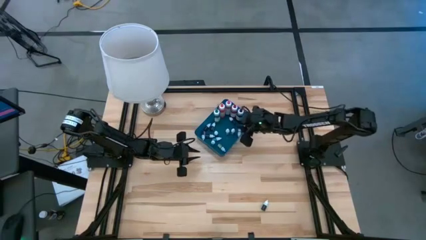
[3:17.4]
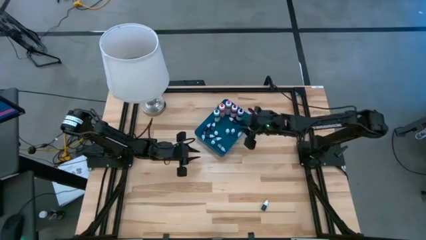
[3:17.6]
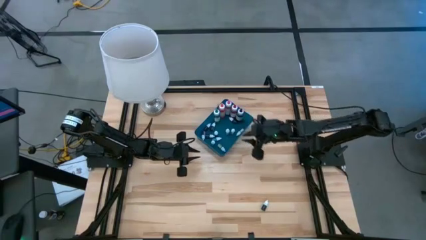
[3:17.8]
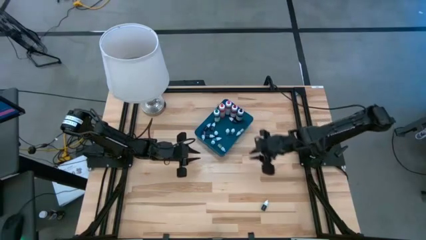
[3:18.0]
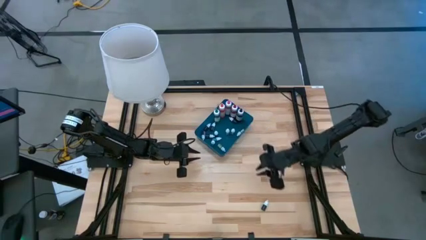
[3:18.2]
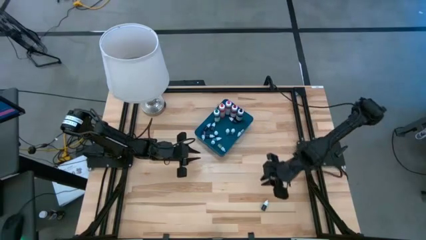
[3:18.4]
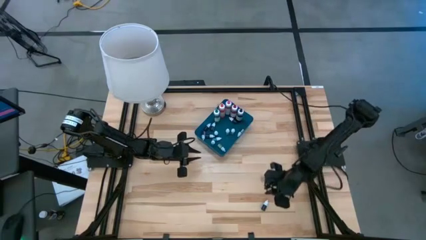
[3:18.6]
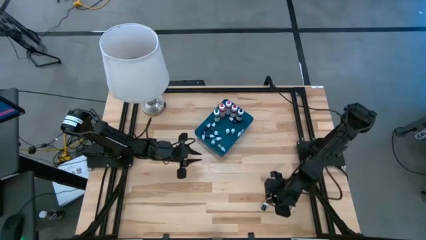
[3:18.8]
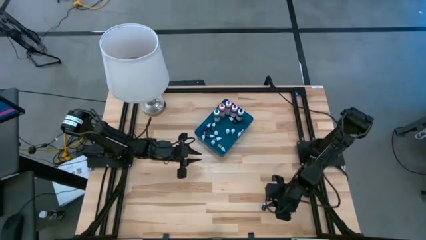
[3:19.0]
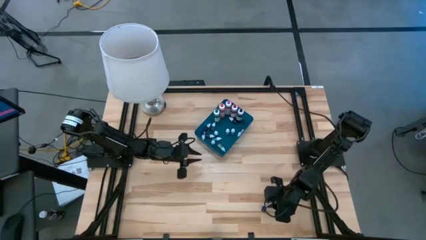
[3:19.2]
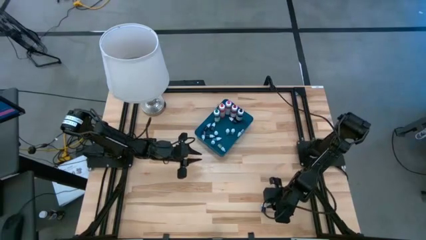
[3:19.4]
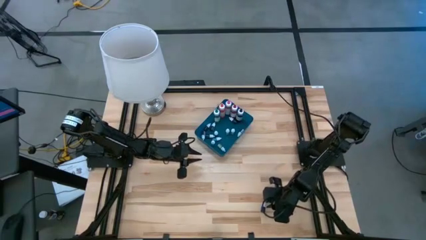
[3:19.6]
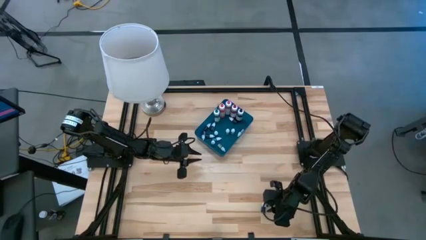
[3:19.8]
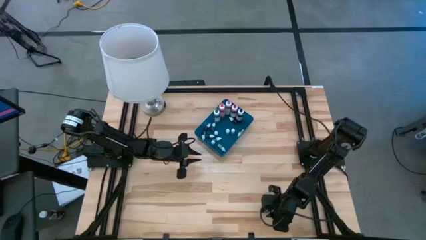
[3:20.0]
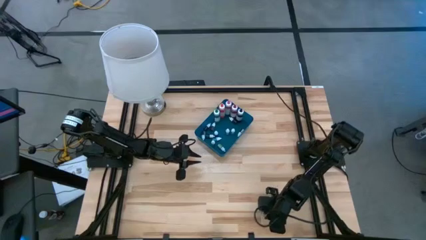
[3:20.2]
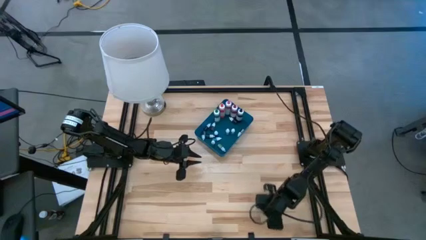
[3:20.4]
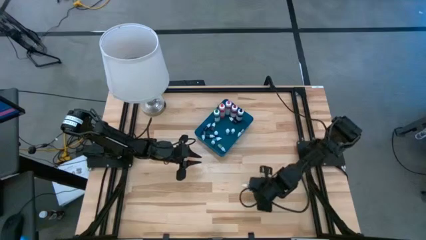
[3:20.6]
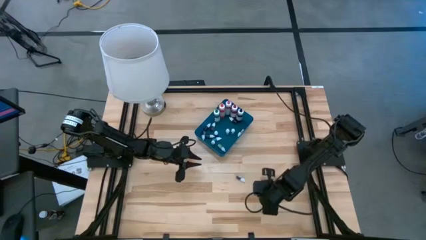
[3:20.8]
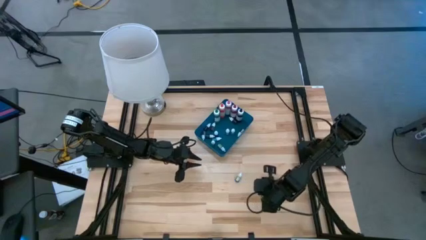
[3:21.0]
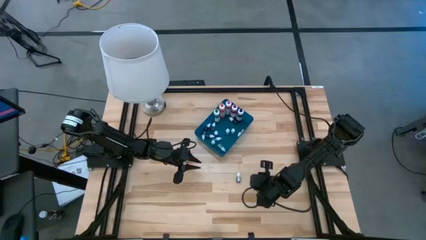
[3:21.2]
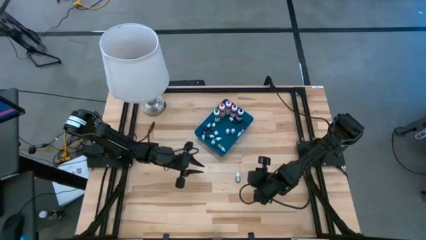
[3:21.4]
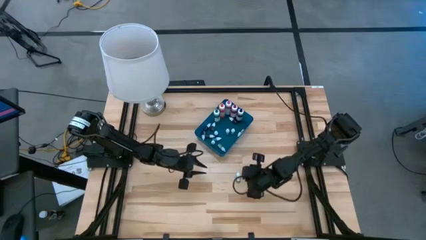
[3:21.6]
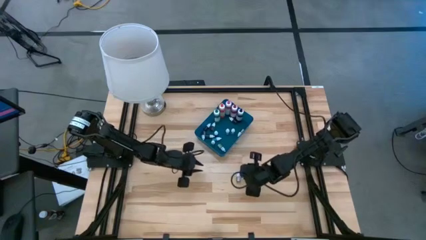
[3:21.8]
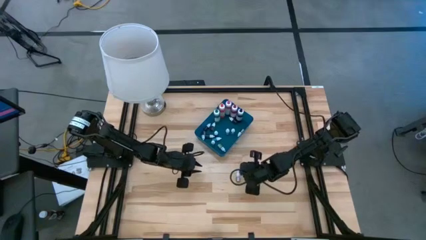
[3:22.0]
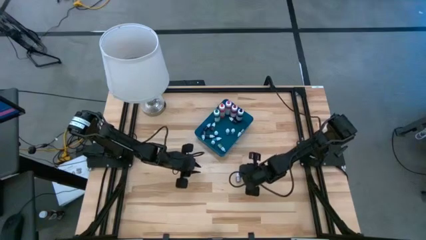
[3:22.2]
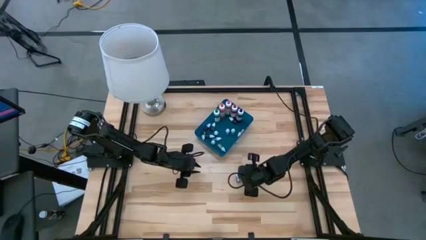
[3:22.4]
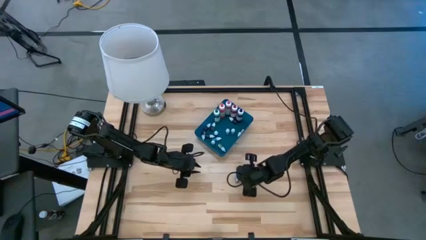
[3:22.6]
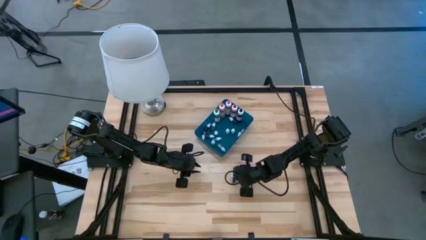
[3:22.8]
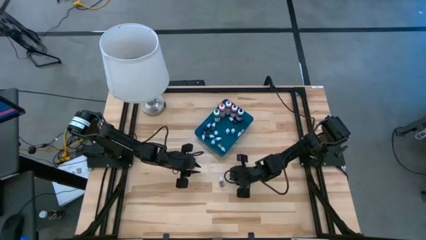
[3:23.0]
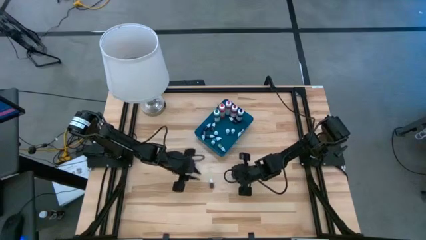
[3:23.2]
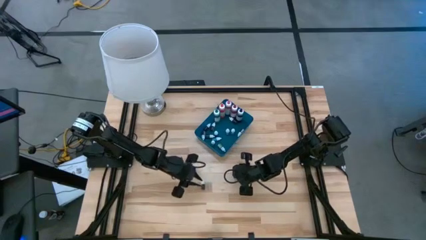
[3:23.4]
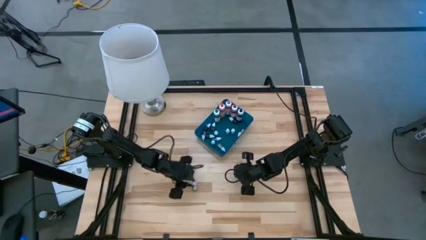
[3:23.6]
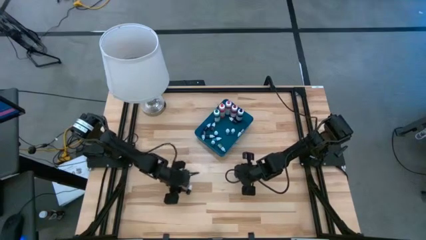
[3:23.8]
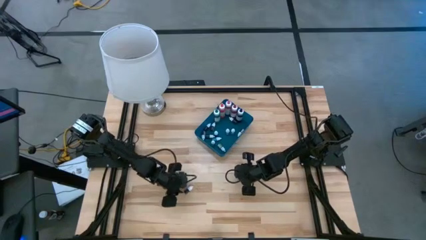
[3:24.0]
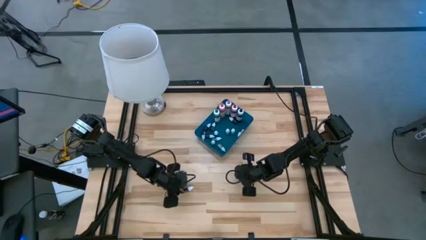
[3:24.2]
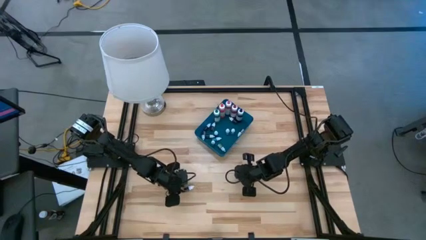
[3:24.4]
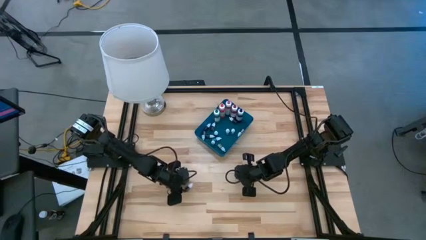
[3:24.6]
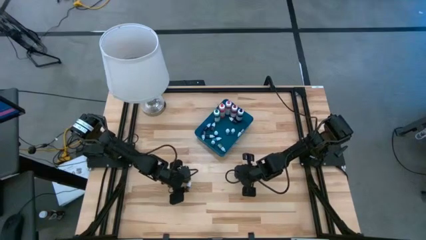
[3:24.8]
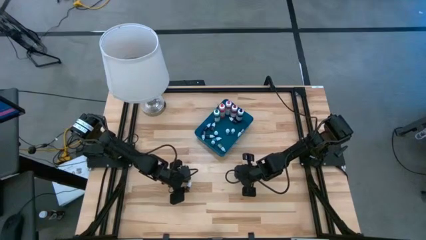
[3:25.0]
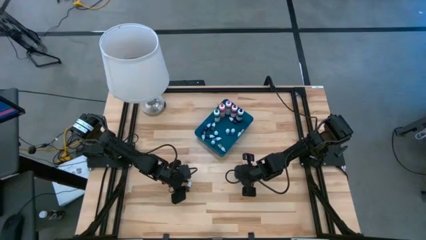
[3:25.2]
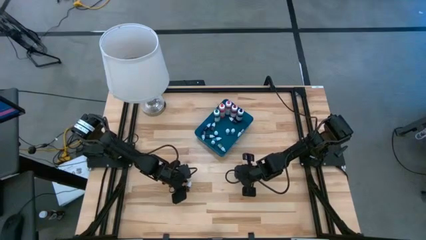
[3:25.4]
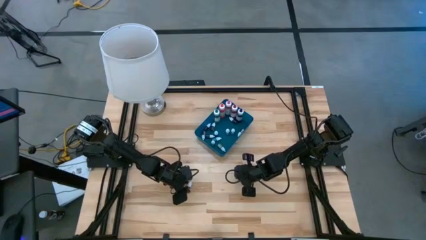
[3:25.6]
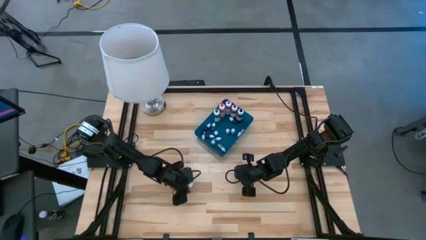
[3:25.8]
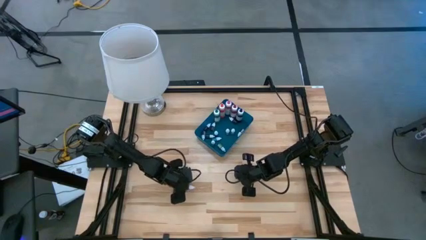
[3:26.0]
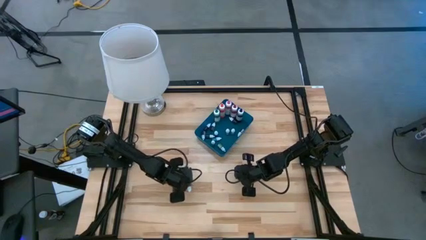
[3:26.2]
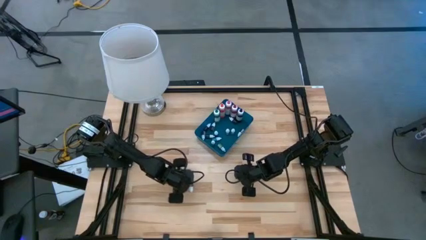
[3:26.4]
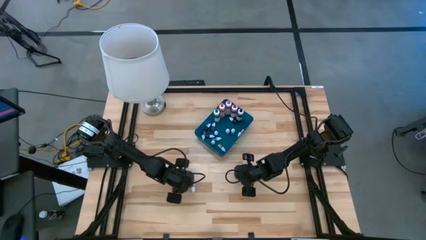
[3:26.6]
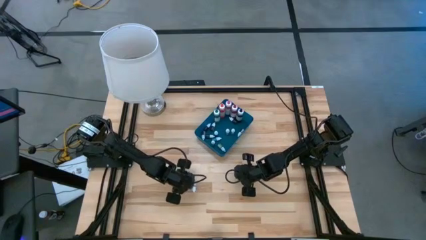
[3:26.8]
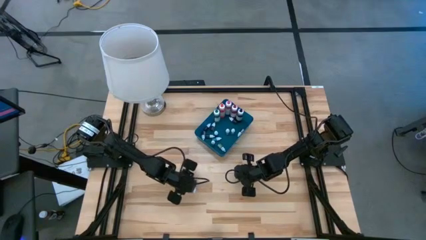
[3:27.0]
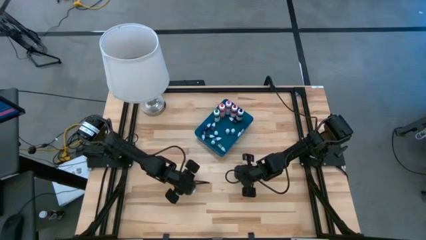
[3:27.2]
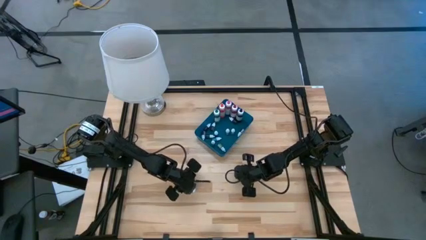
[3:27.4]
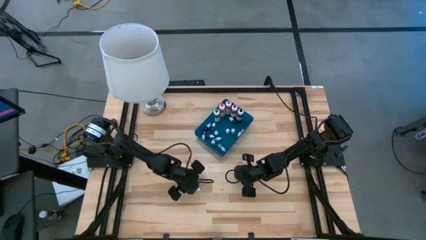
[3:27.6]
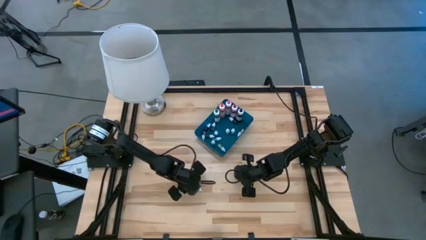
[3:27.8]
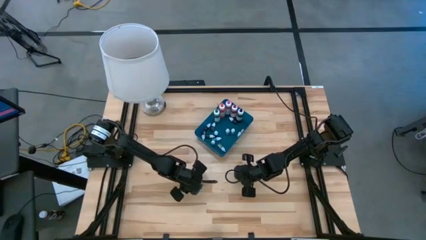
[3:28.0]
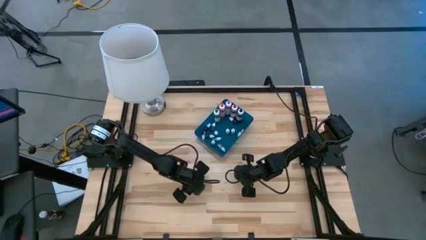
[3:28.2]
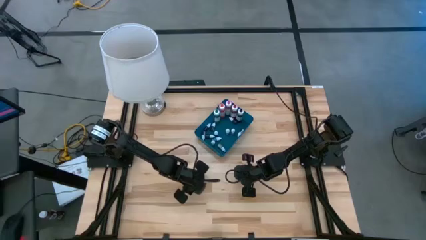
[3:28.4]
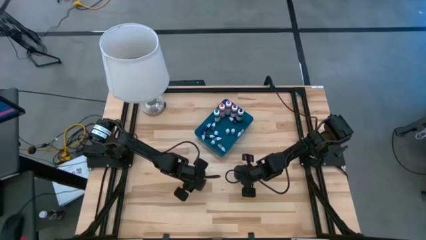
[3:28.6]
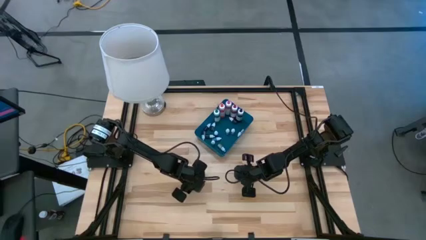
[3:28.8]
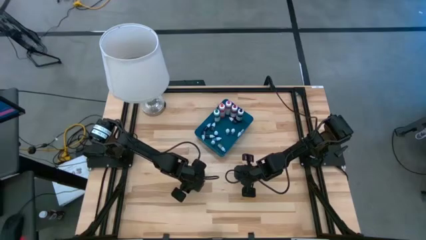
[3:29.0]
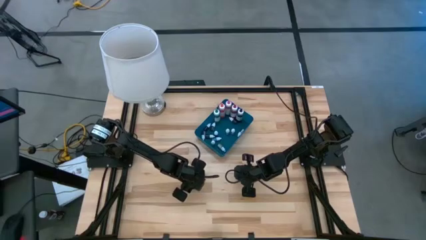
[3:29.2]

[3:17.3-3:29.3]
Task: Pick & Place food coloring
Put the small brown food coloring bottle into the blue container

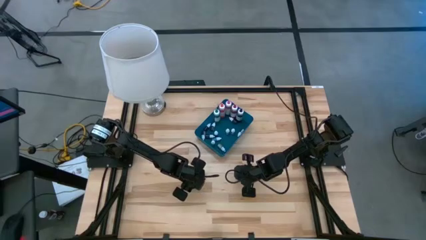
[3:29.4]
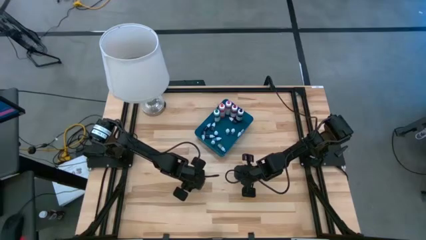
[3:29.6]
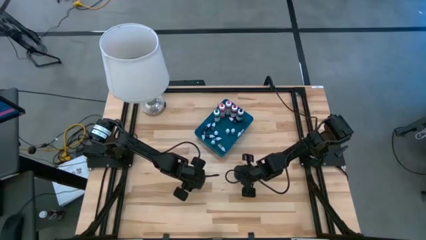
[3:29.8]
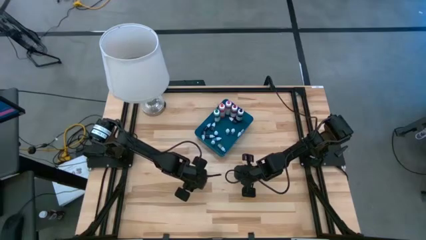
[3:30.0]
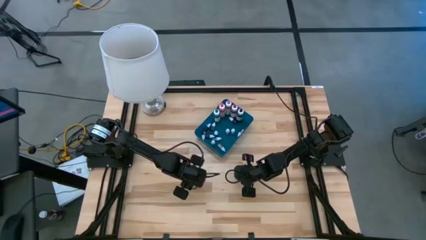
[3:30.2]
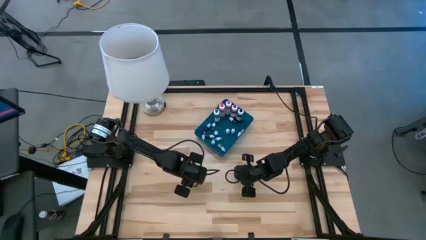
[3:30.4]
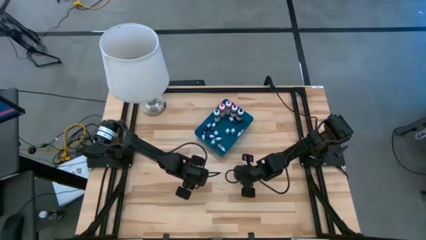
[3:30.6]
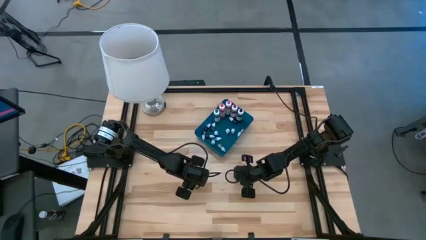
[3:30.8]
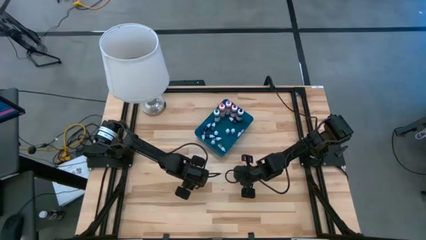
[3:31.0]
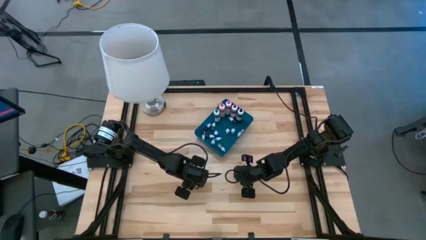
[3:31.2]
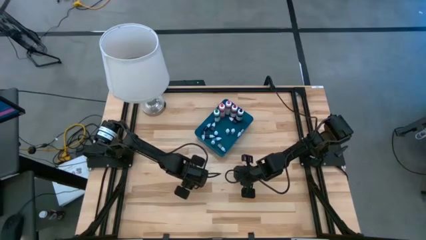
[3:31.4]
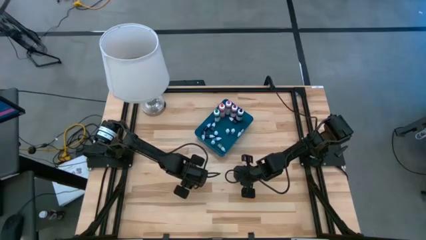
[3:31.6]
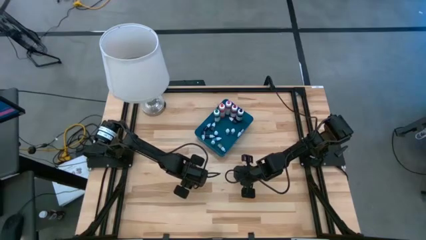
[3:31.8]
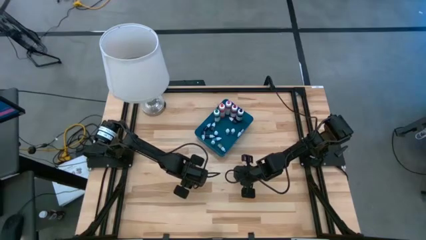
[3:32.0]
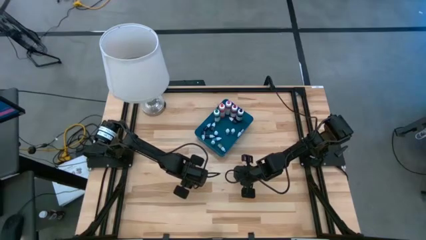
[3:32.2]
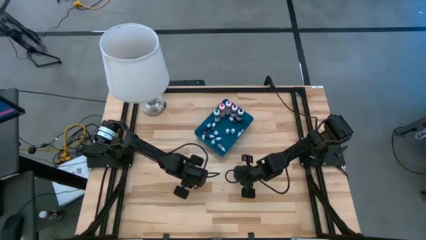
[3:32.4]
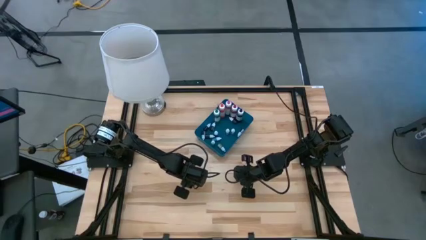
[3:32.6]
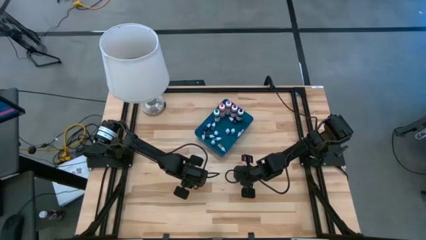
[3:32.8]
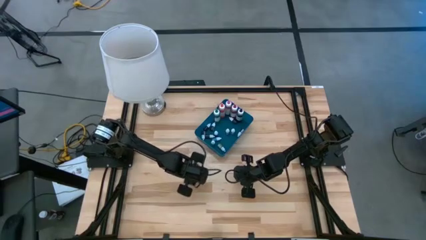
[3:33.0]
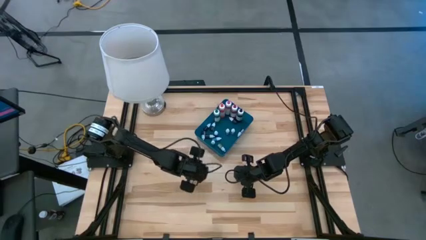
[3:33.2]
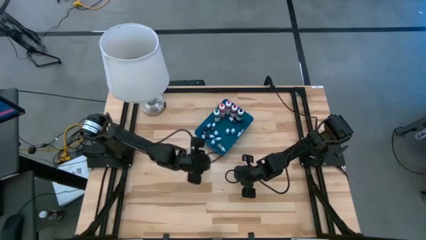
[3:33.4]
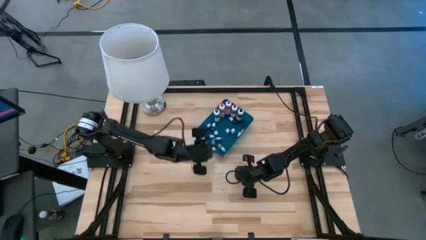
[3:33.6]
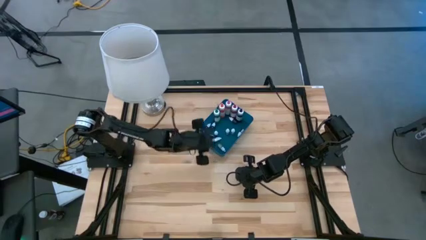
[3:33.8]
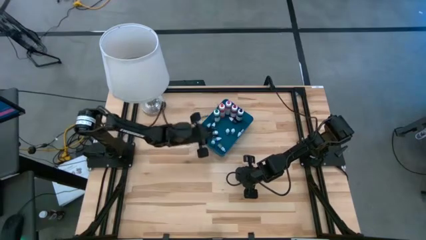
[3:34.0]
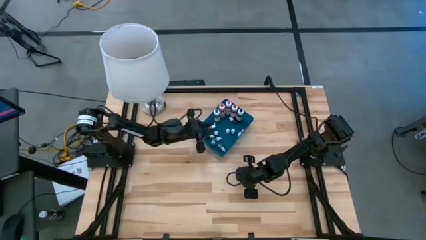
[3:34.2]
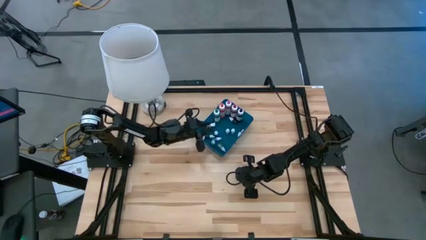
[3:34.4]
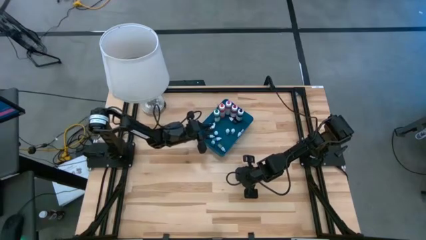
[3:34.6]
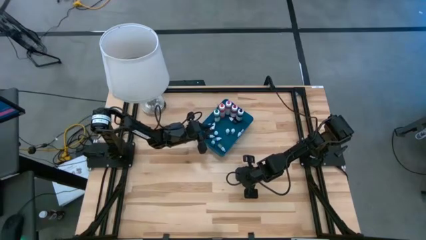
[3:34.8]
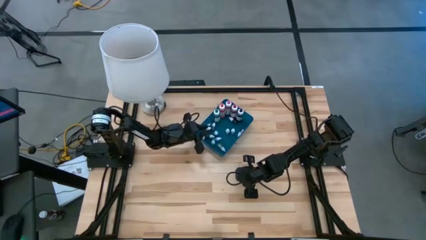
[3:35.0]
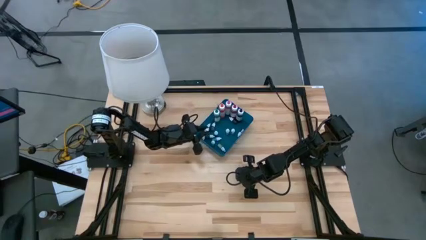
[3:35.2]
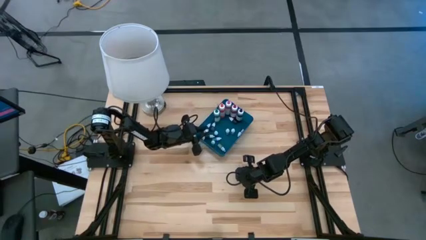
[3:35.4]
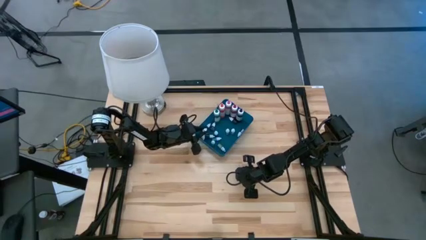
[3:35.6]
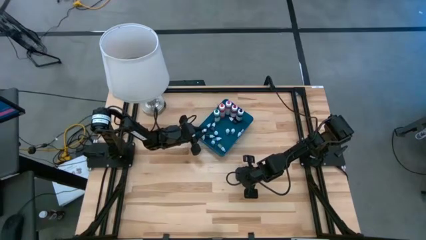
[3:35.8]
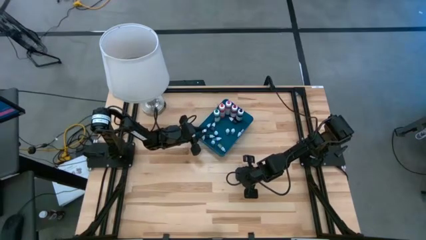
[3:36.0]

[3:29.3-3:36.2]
Put the small brown food coloring bottle into the blue container
